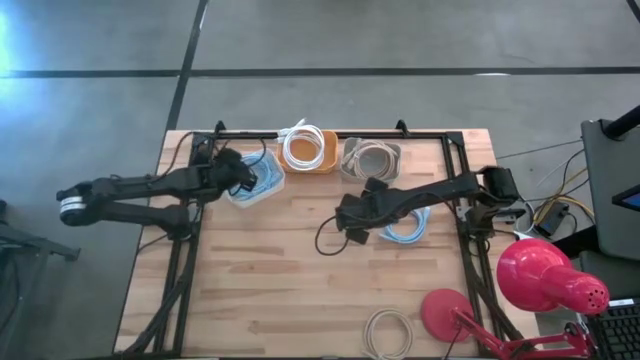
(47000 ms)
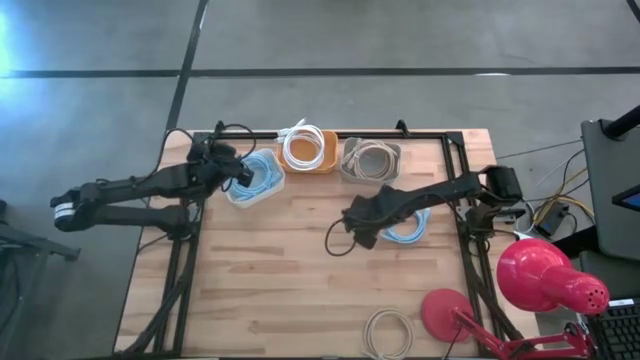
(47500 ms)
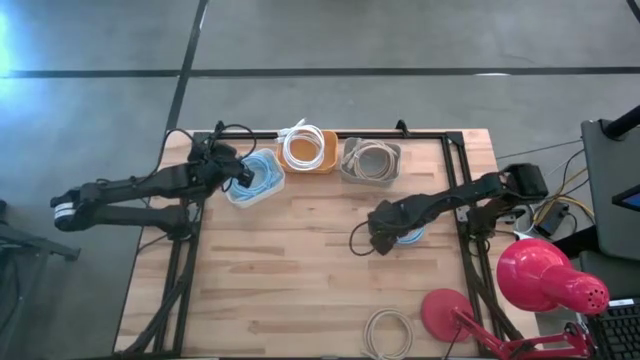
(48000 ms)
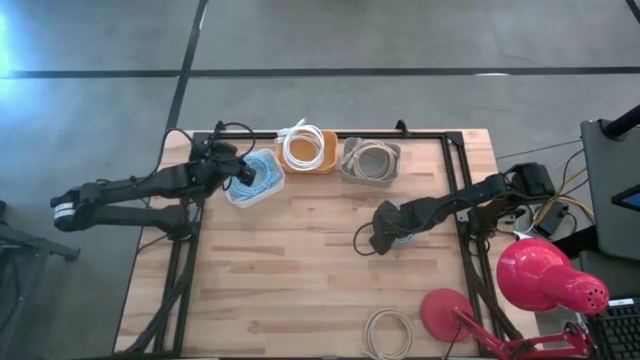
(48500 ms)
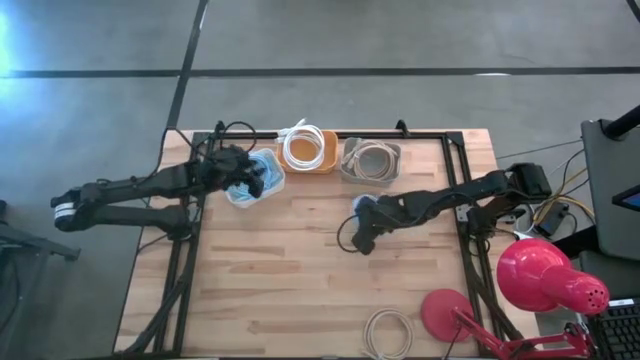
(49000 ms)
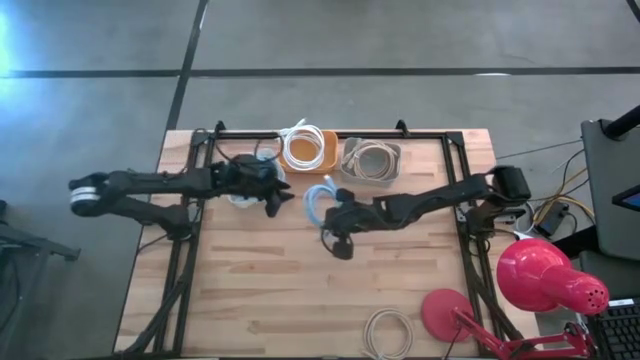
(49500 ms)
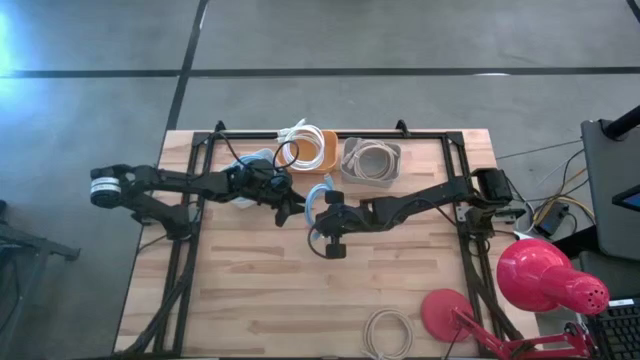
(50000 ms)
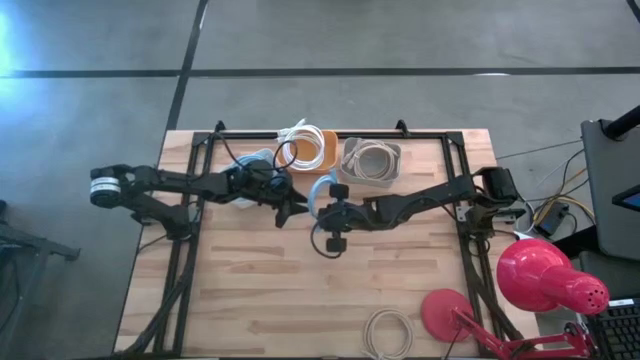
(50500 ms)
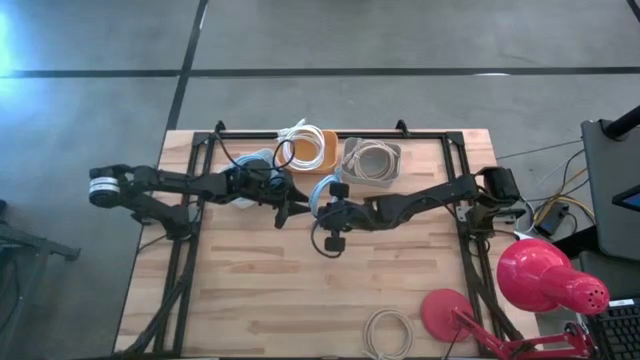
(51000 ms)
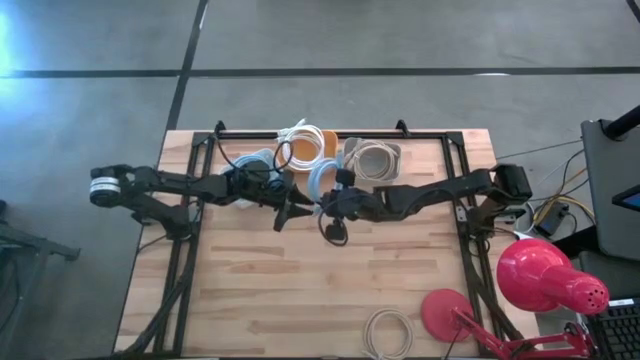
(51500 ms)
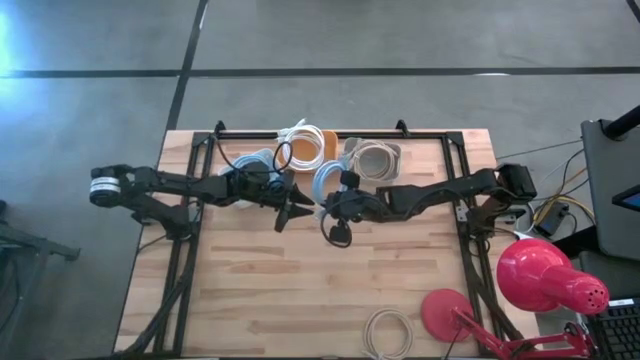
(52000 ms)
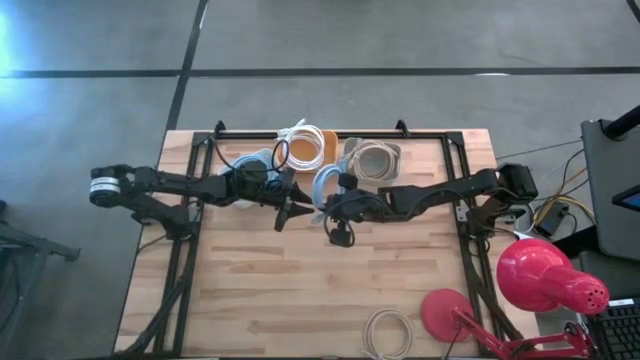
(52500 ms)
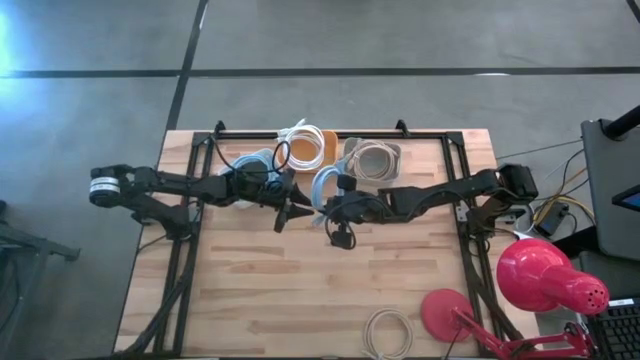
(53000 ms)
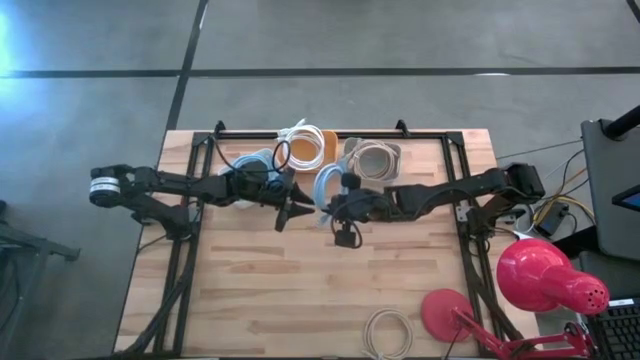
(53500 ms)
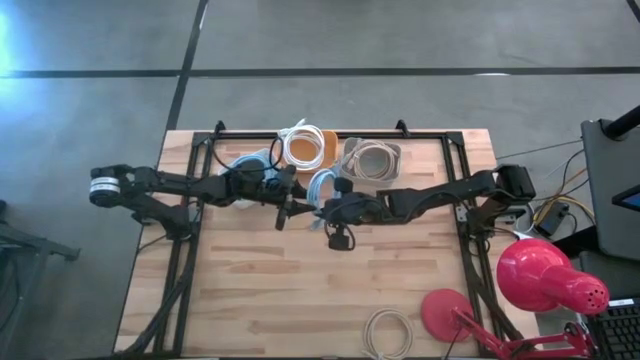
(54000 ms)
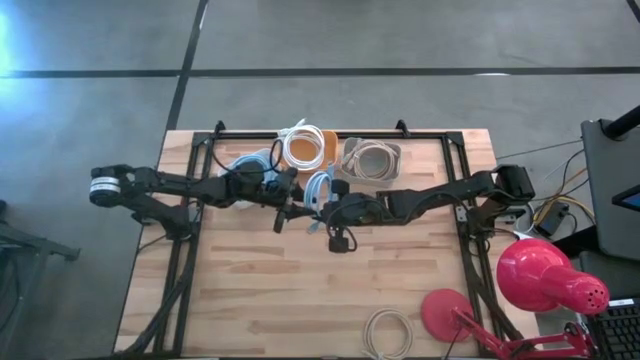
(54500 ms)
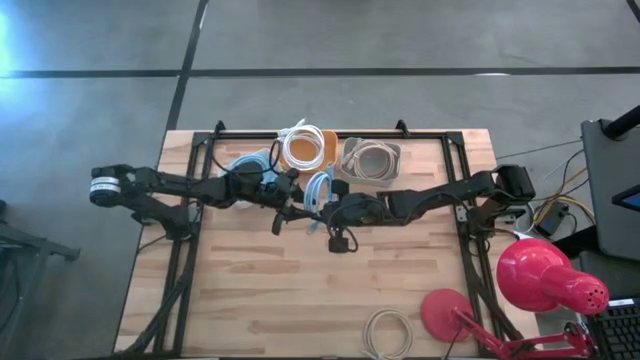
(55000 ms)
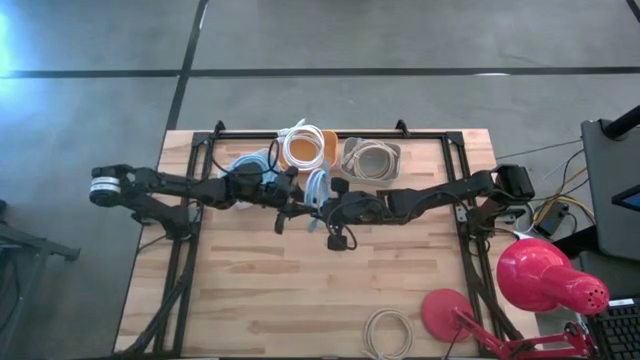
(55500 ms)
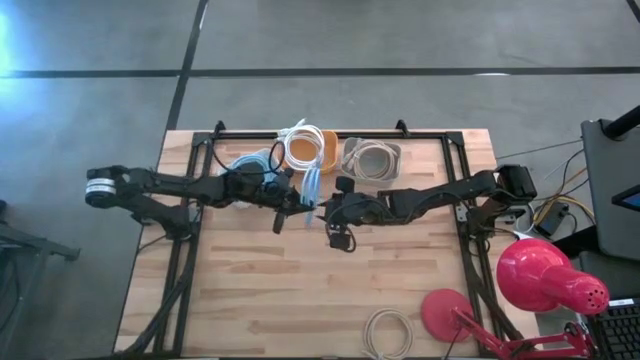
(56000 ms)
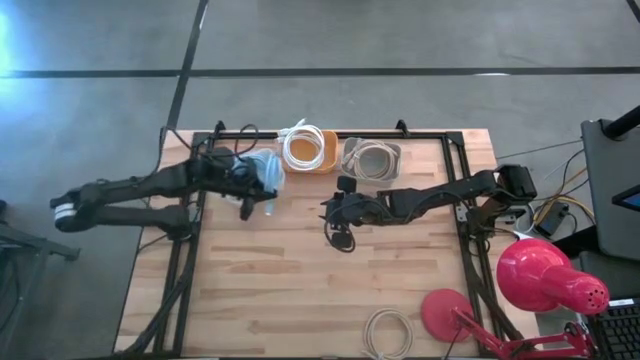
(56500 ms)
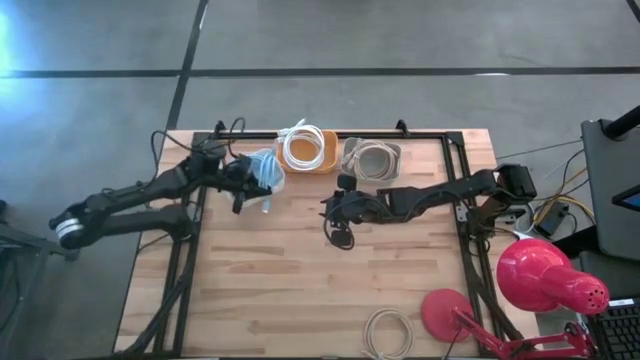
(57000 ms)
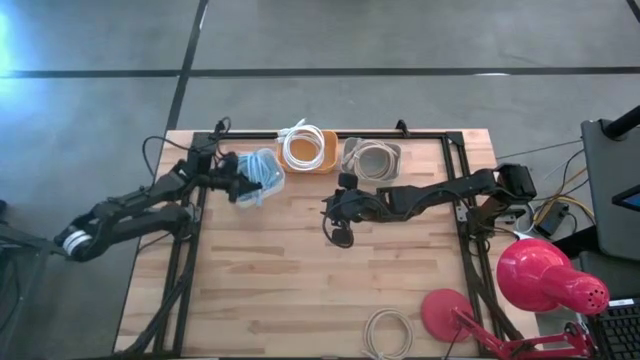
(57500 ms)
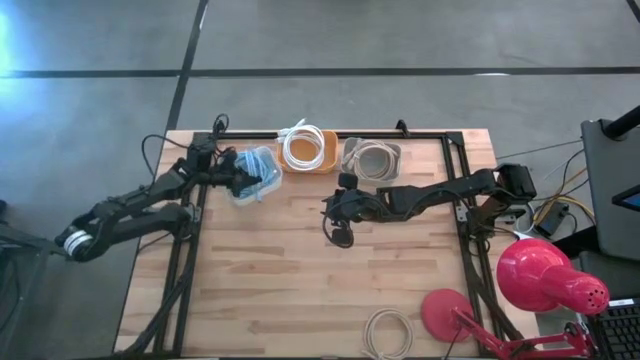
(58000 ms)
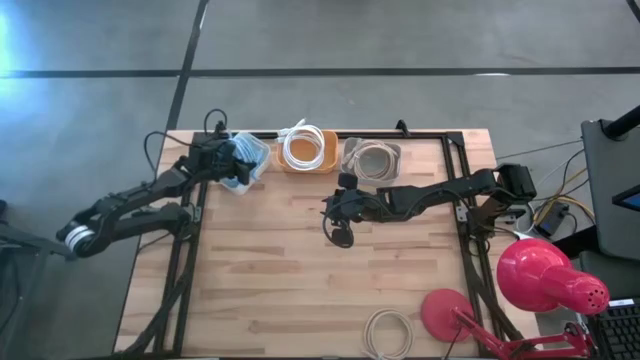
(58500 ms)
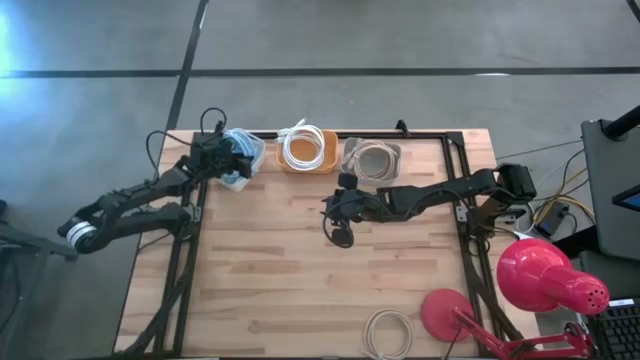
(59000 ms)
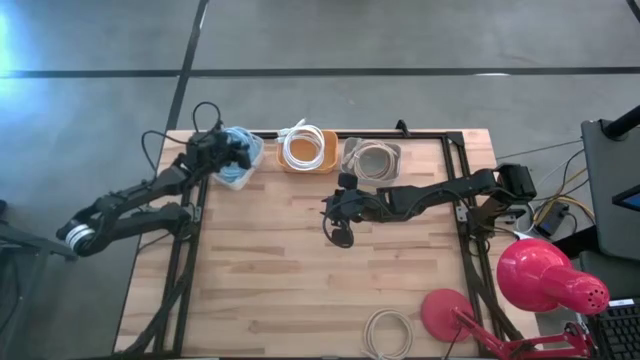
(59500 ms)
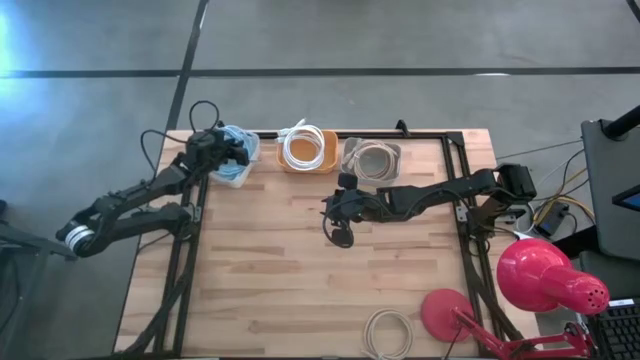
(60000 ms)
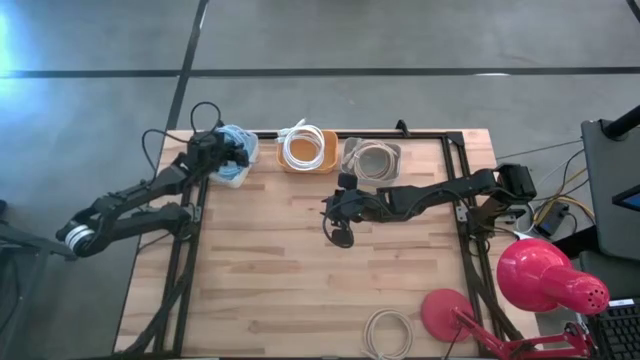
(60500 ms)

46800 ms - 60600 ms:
Task: Sort HDMI cables
Put the light blue HDMI cable into the white bin

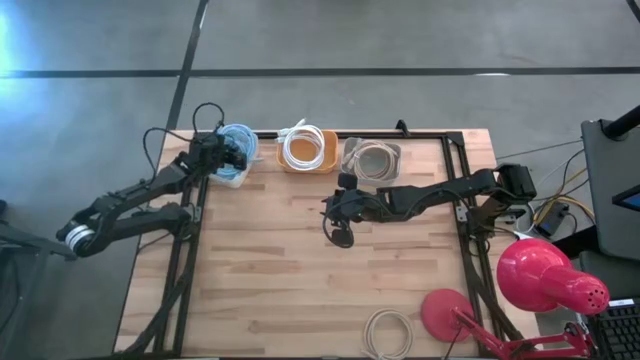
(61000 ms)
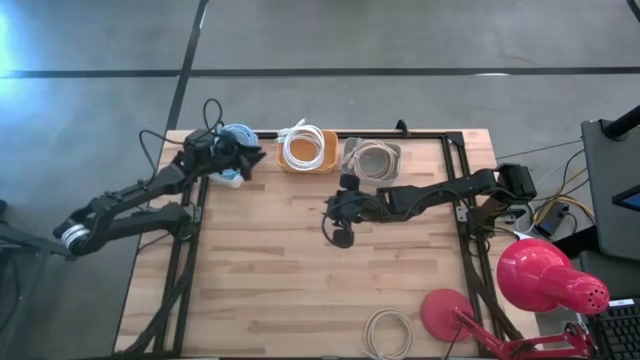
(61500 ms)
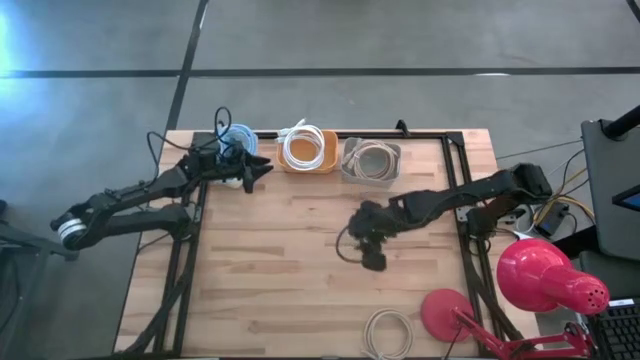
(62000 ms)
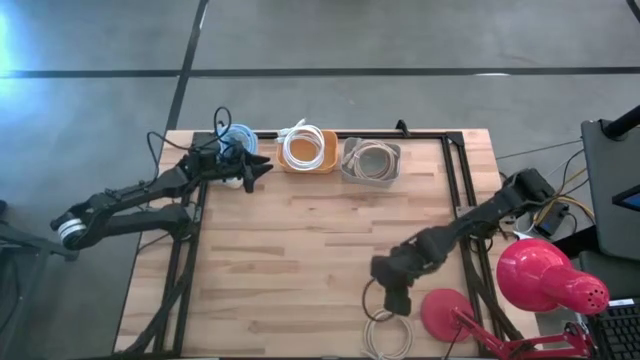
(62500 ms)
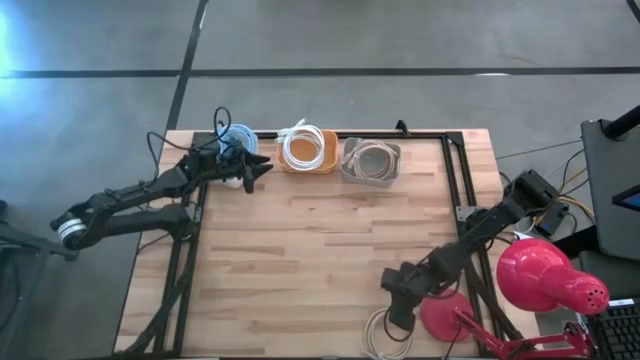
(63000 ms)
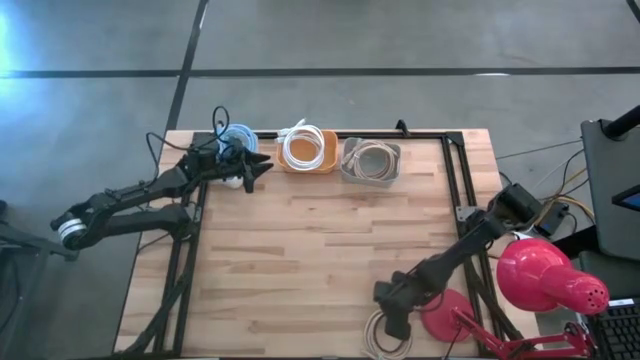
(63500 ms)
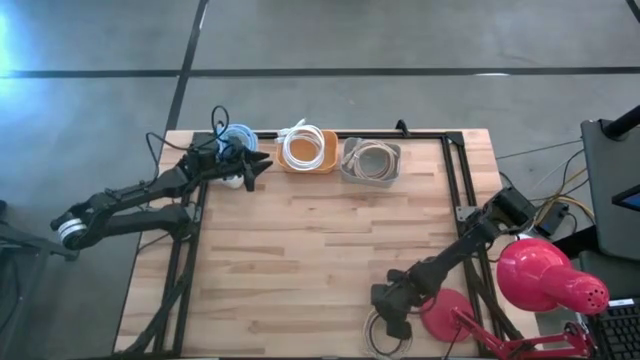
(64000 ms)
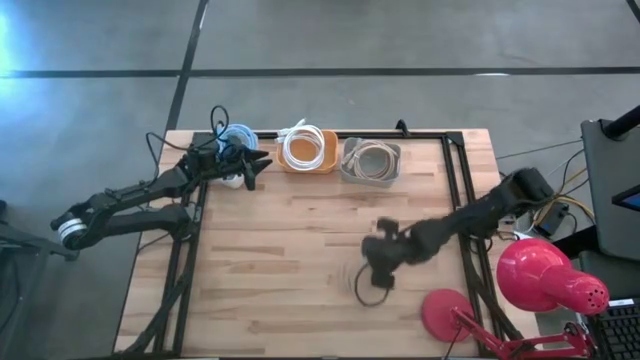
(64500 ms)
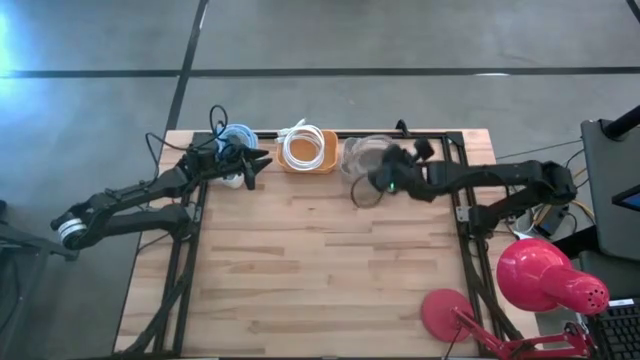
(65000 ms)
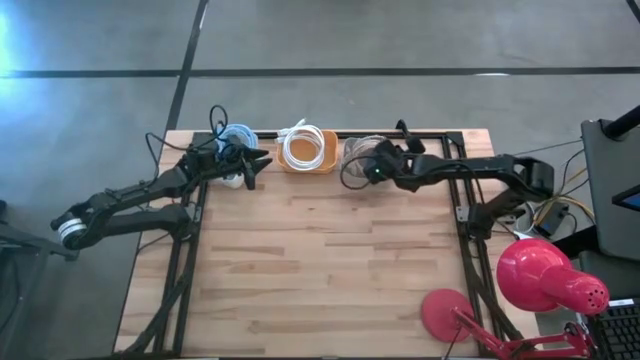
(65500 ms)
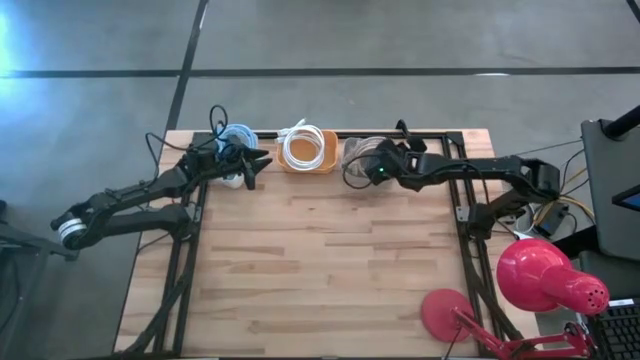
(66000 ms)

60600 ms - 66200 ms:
Put the brown HDMI cable into the brown bin

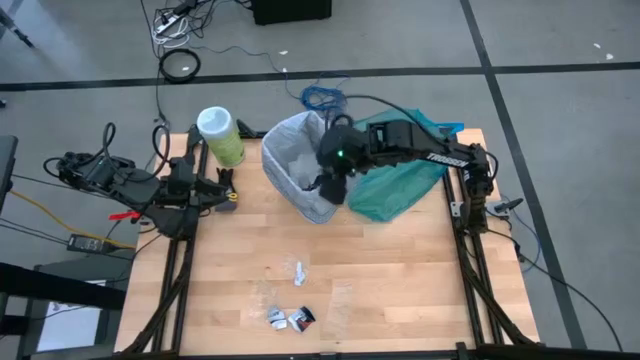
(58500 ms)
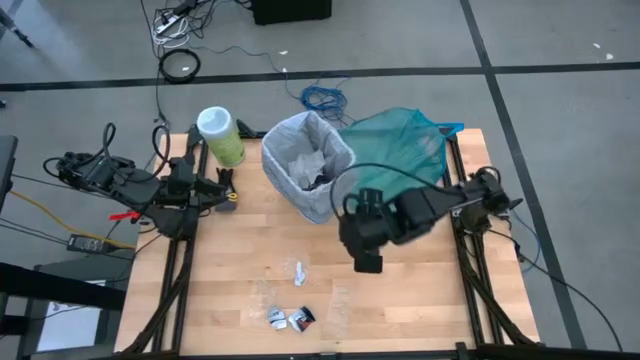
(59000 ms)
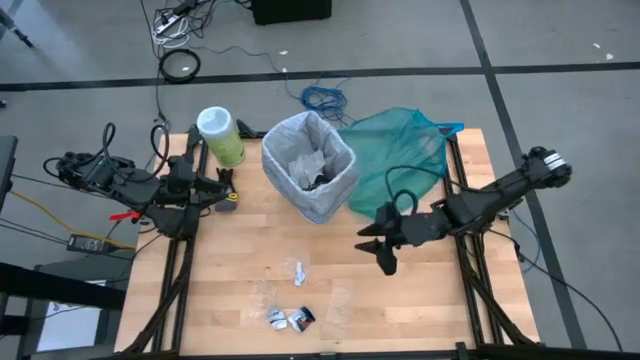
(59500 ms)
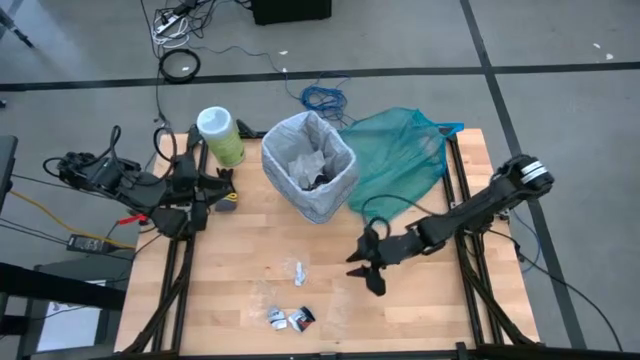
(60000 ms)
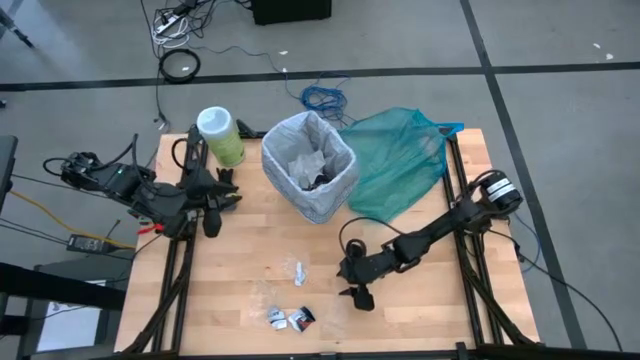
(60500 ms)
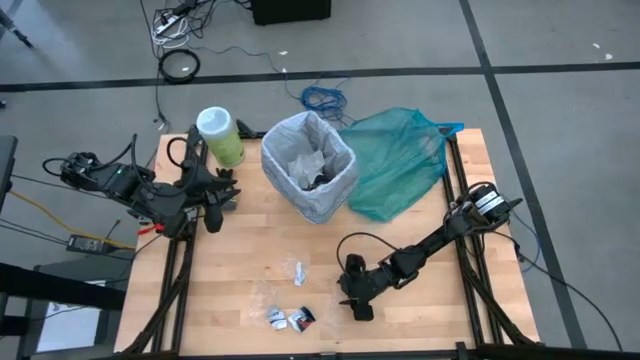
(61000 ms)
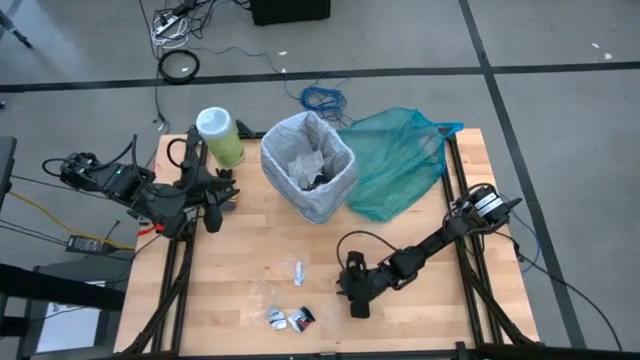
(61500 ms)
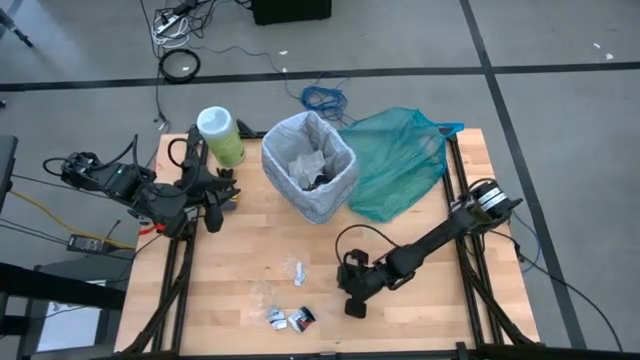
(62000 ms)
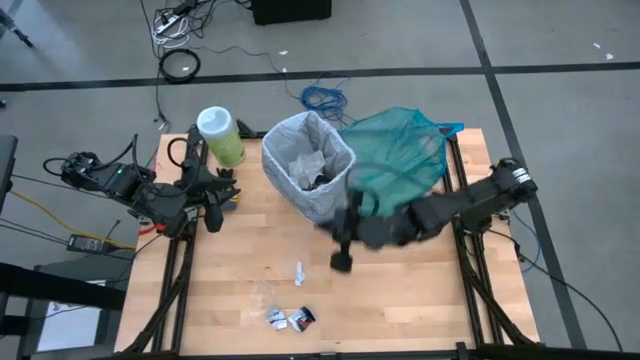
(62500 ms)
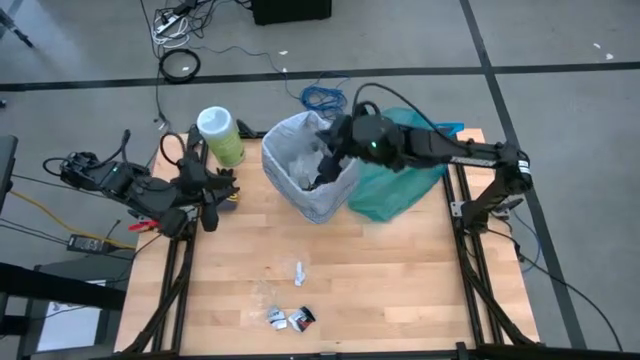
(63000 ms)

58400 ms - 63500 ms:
Task: place trash/remove bag and relplace
Put the transparent plastic into the trash bin
